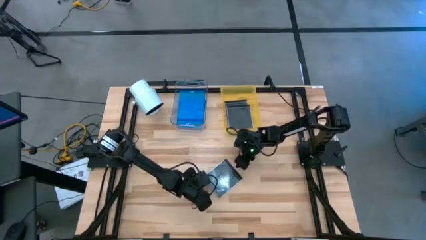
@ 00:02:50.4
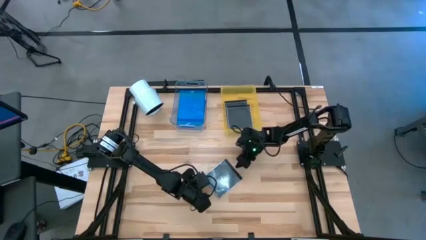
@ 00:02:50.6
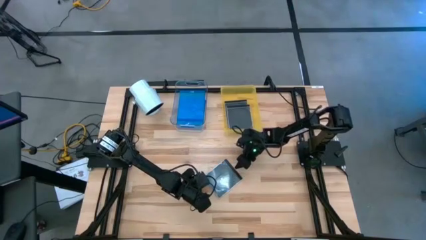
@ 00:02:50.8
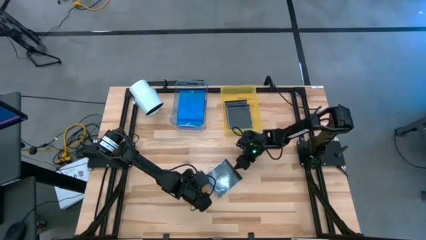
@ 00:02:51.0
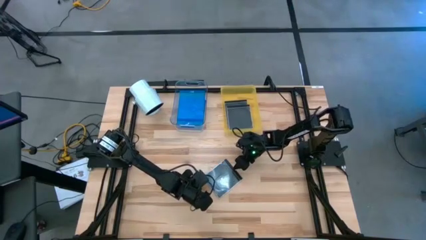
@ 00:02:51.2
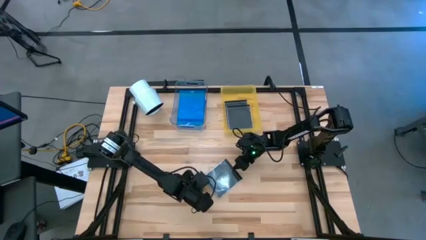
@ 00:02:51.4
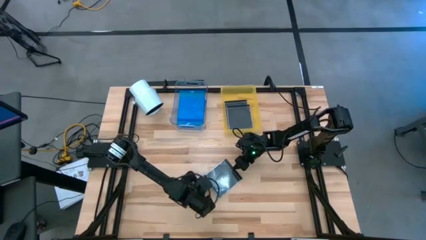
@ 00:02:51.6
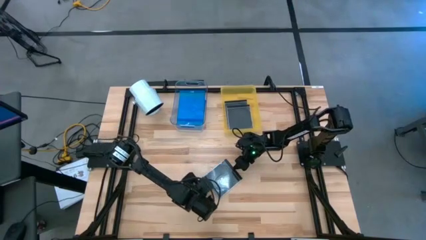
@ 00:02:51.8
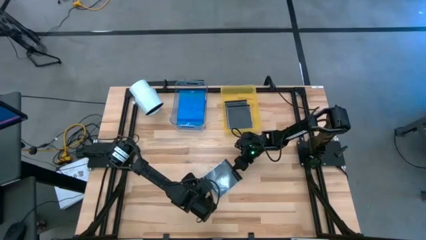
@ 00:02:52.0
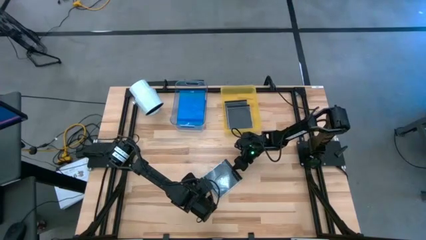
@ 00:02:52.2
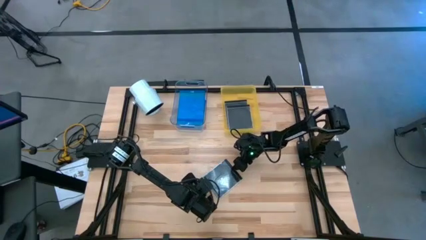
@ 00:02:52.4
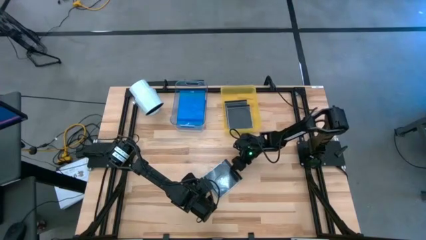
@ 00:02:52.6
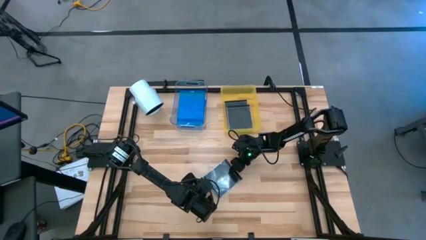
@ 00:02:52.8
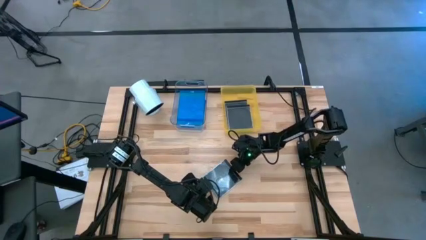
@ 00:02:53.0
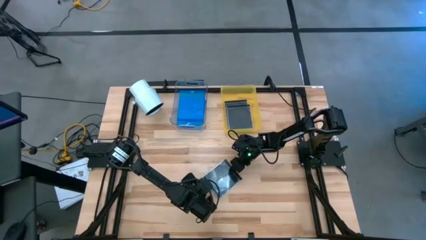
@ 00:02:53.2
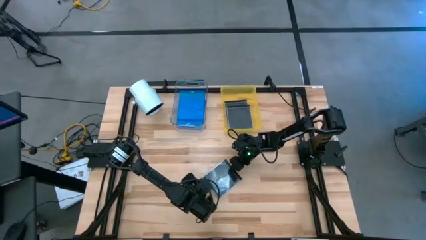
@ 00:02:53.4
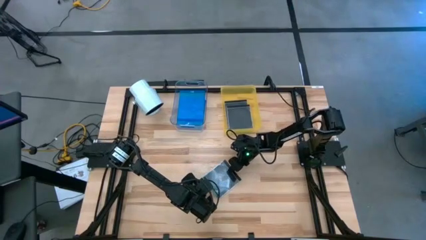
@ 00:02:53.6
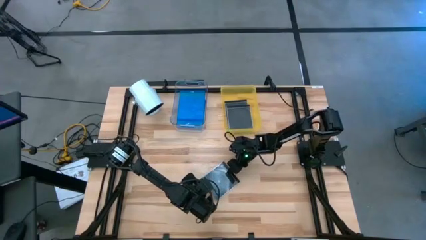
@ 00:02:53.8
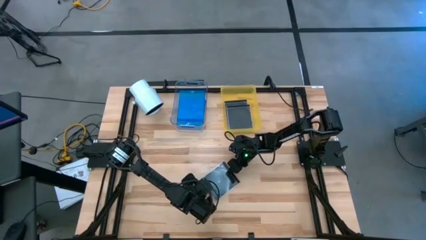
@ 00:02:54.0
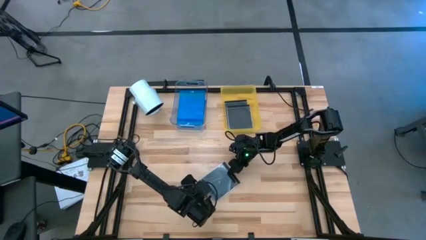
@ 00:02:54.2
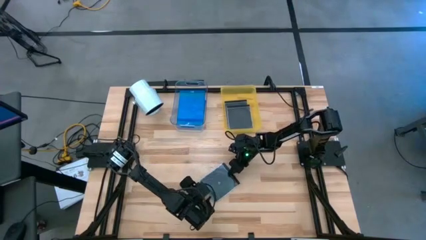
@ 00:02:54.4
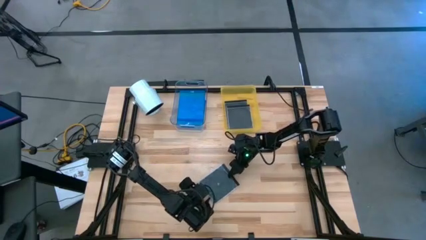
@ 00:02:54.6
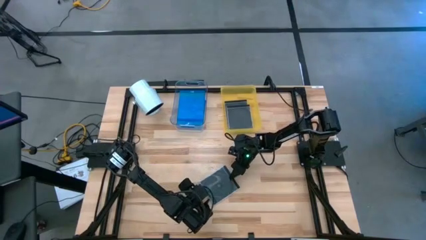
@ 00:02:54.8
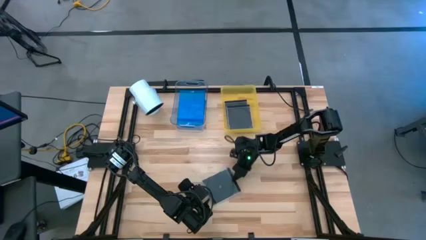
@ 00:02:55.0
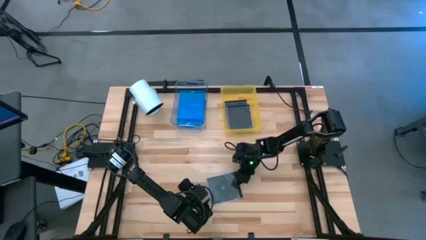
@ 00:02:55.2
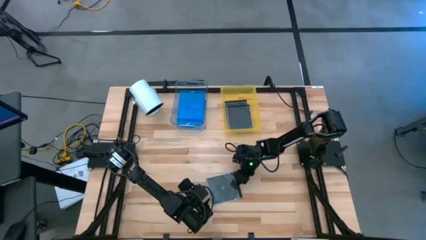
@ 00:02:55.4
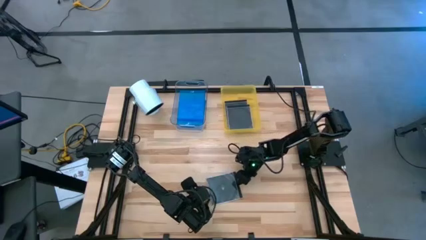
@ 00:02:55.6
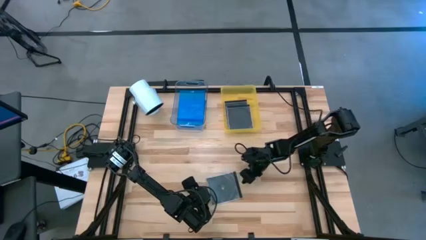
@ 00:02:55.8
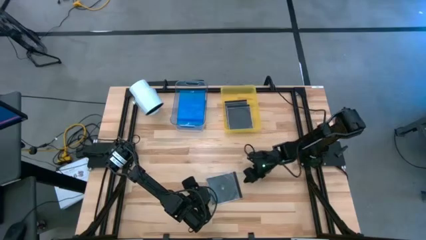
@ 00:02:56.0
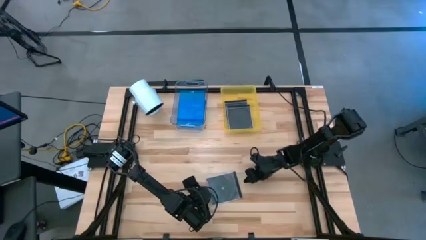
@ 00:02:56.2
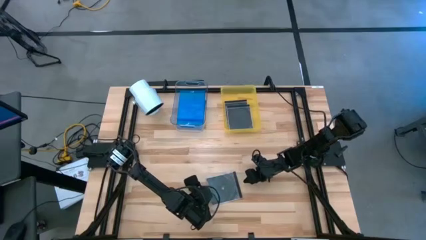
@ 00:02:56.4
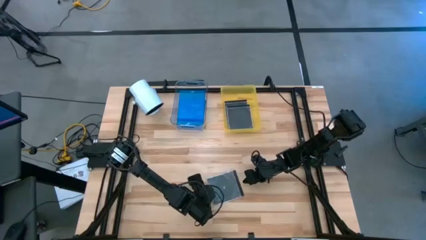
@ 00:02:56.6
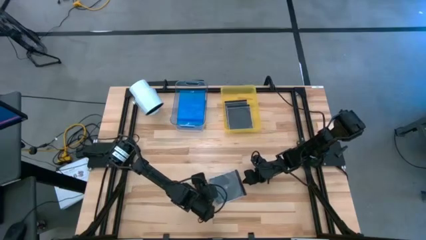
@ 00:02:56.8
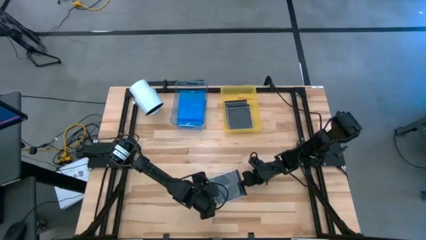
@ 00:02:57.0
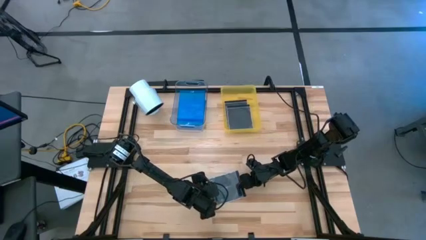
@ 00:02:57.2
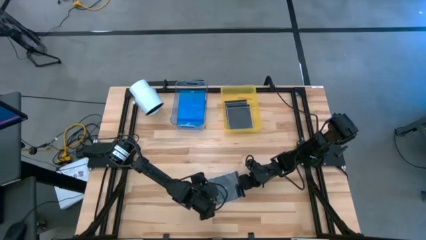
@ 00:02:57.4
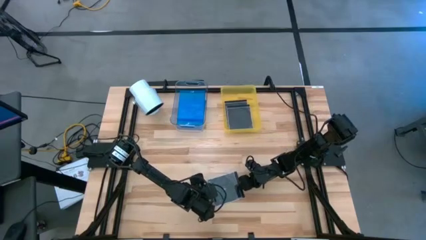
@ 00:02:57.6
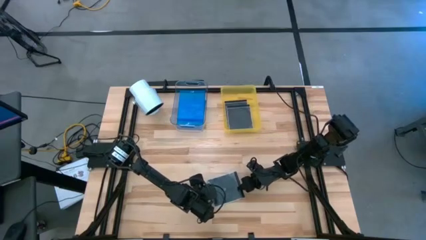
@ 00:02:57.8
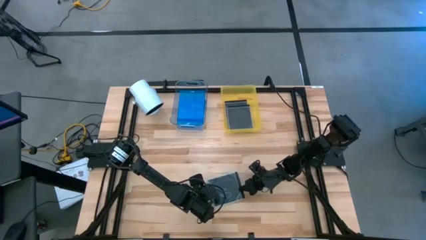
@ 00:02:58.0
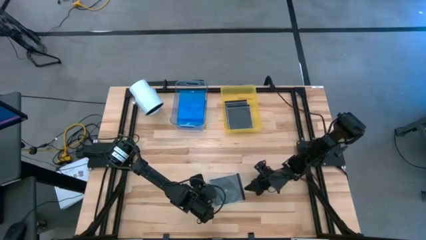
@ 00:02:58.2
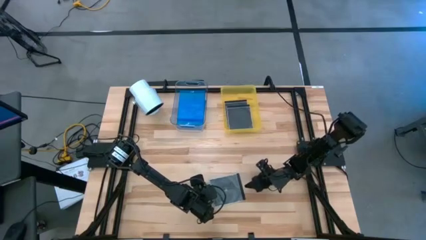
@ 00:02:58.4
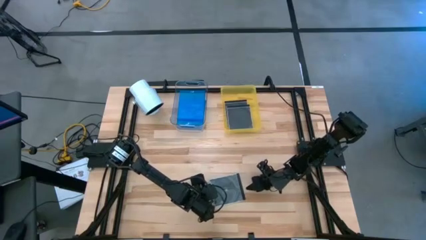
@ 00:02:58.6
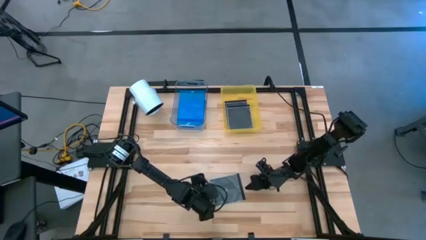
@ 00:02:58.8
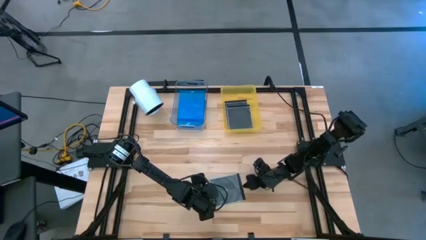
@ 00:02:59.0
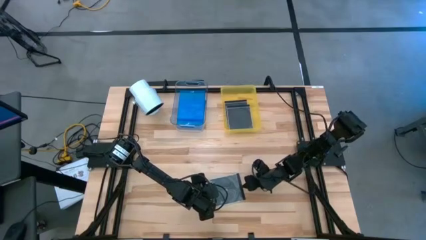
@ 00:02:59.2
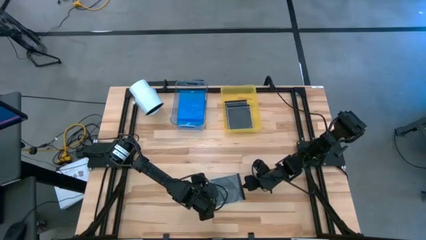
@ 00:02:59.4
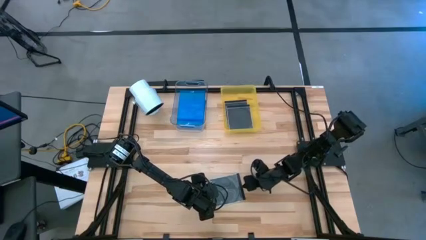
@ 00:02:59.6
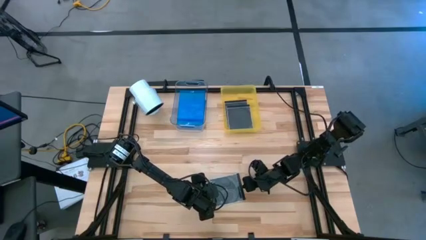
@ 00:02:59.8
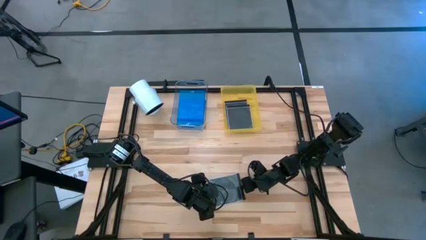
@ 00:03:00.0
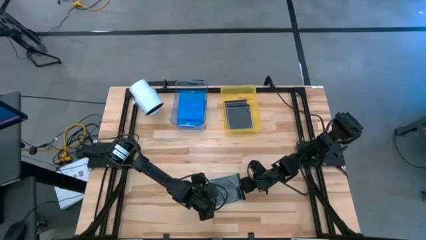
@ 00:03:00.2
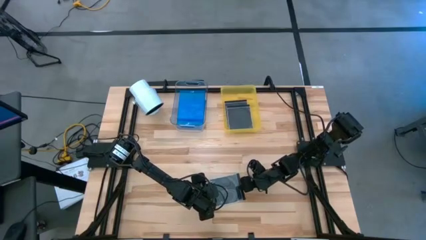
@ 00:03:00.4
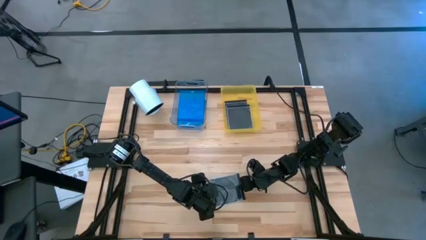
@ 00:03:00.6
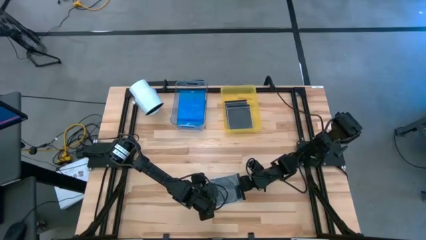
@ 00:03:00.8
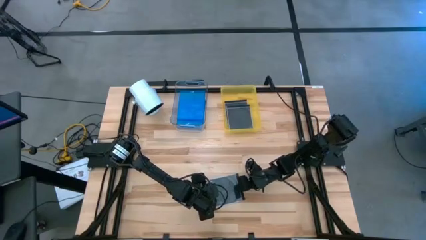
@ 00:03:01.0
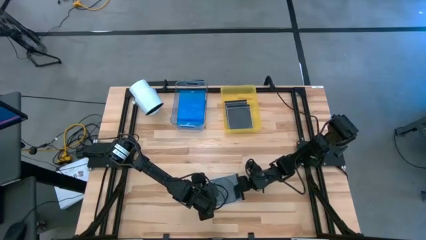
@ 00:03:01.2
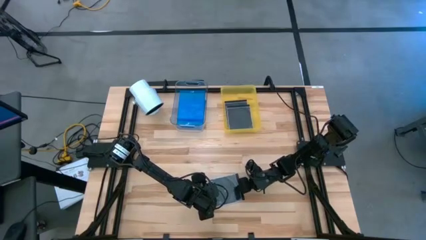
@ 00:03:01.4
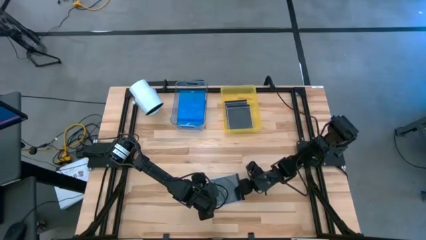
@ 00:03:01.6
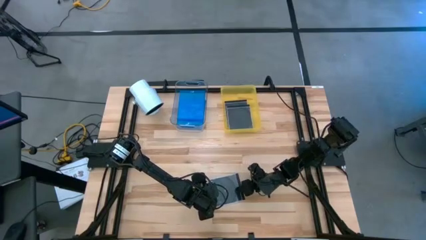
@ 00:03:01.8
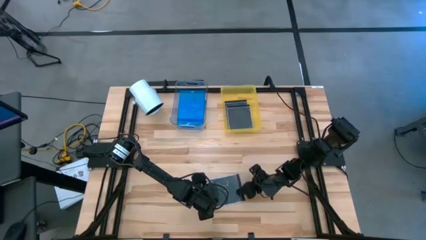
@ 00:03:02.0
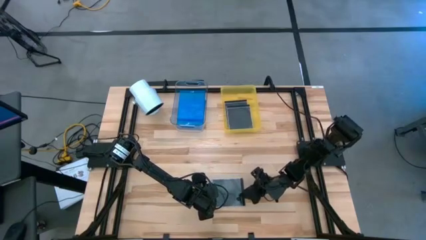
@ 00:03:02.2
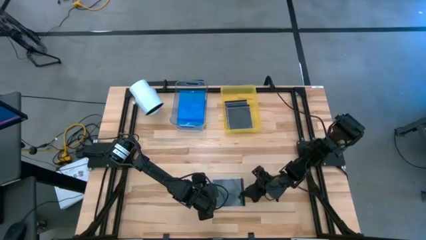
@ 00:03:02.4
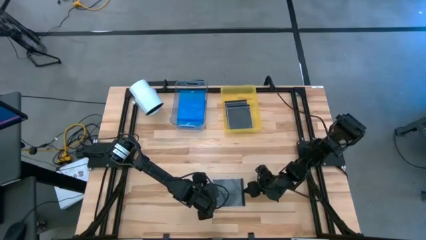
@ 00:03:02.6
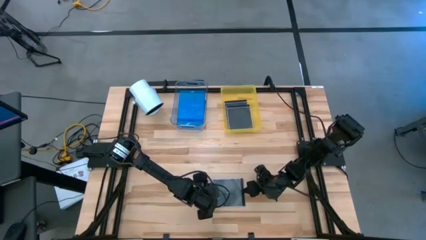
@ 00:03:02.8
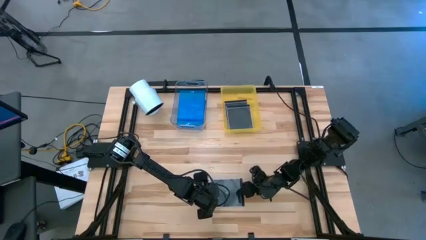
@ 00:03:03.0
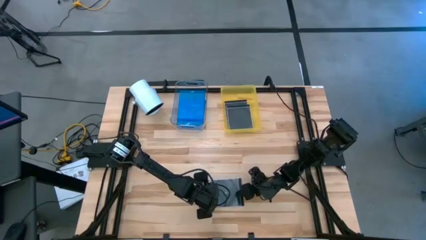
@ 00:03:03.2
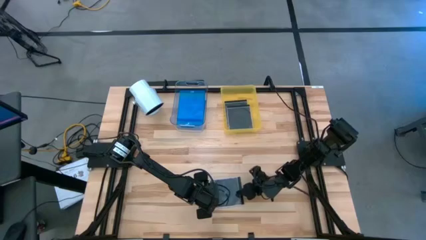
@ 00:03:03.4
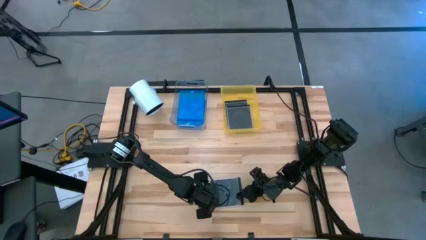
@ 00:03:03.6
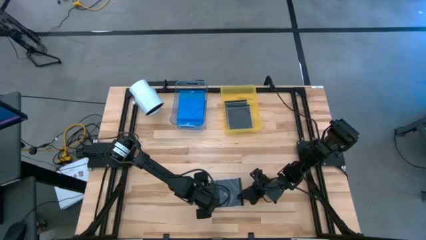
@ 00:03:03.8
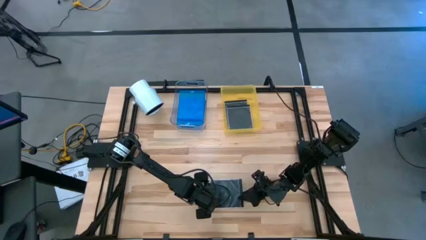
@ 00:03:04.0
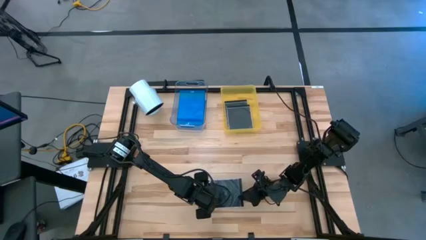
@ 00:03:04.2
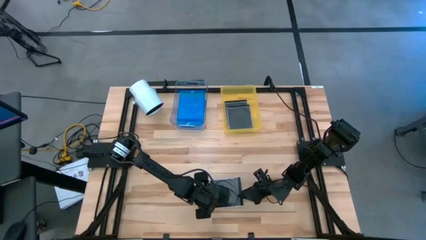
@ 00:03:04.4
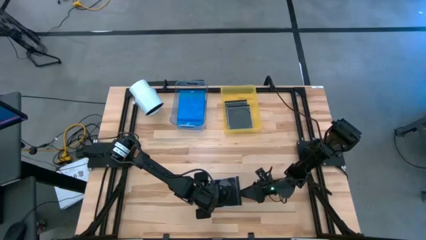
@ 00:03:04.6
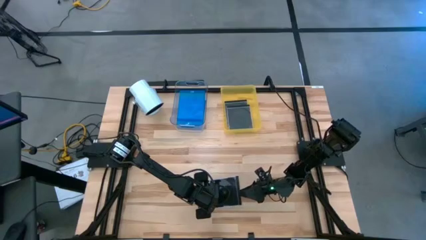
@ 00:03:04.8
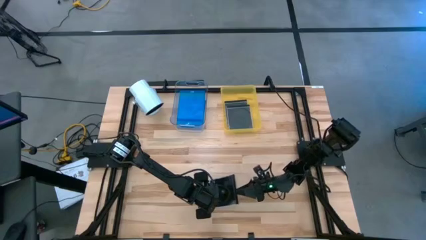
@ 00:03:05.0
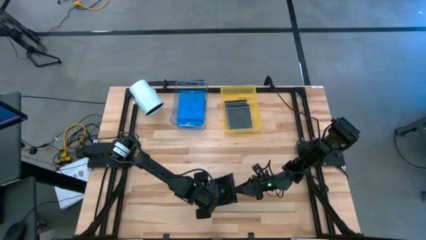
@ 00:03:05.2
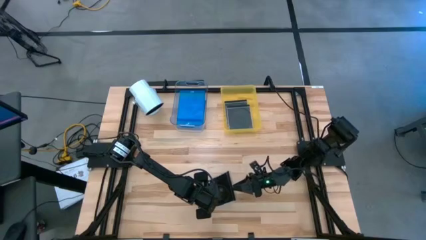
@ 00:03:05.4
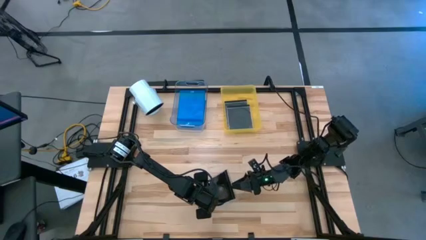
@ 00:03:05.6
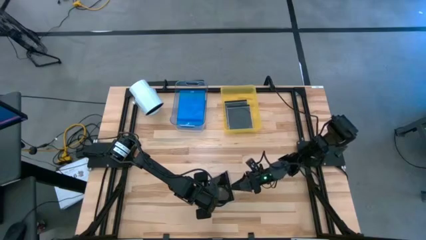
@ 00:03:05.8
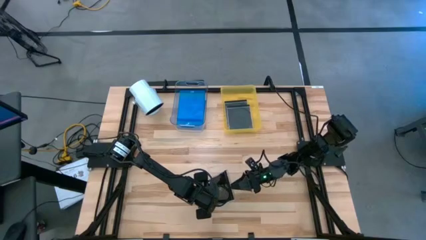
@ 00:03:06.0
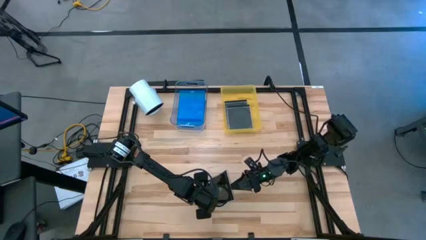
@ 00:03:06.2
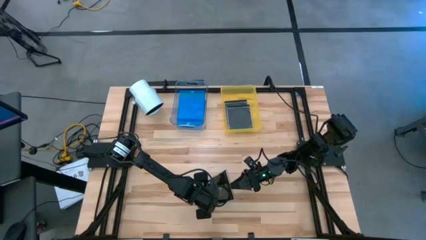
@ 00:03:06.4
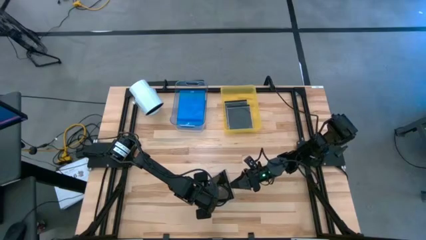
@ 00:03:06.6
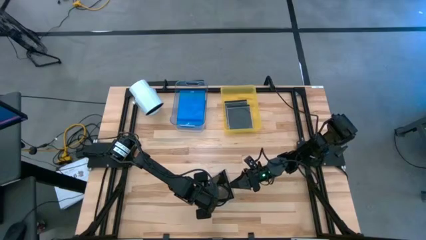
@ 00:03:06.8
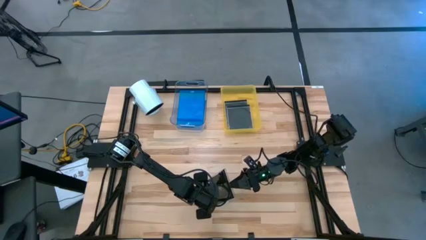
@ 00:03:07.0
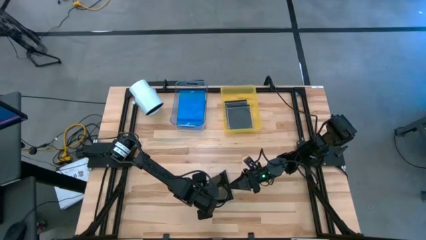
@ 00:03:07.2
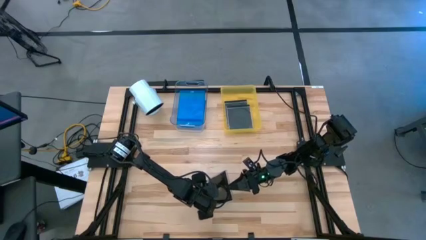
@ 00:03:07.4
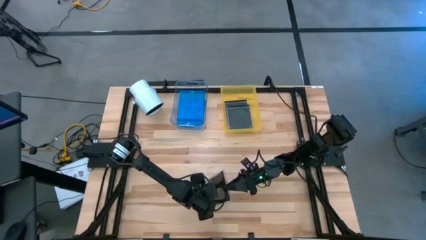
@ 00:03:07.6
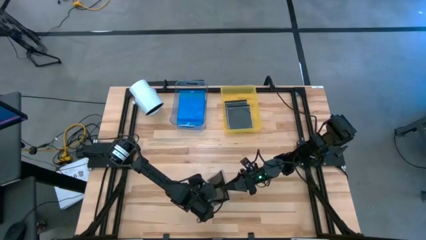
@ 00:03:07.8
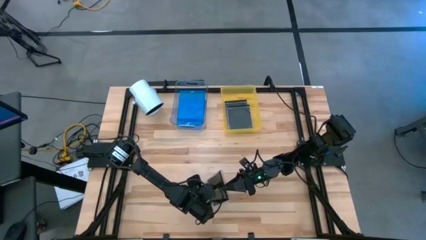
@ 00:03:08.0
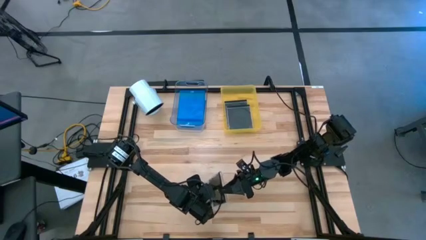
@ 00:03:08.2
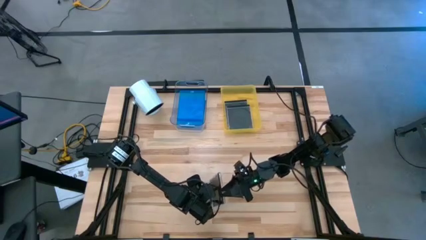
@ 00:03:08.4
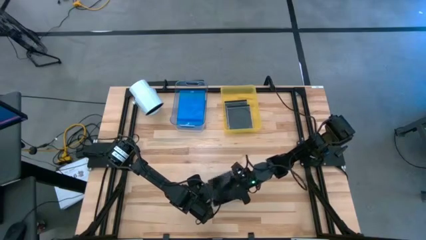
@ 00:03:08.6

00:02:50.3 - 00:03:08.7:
Task: Pick & place jewel cases by type
Put the black CD case into the yellow bin
